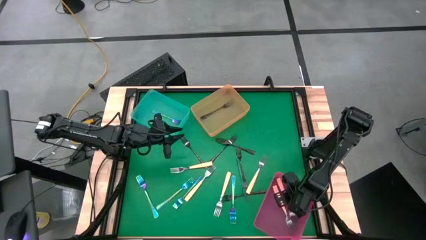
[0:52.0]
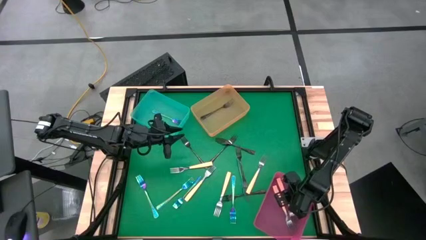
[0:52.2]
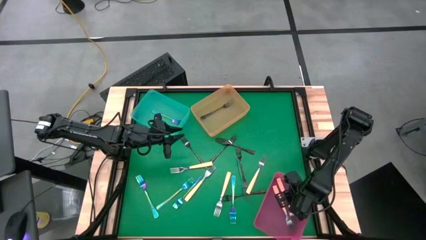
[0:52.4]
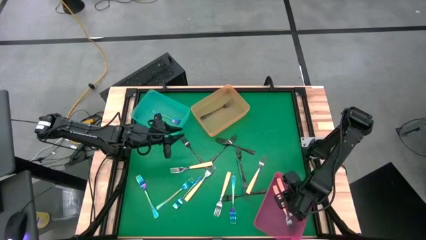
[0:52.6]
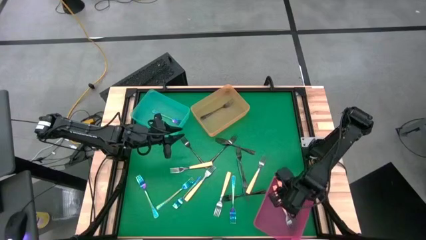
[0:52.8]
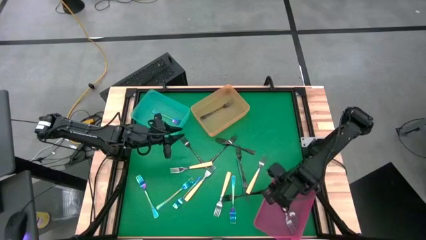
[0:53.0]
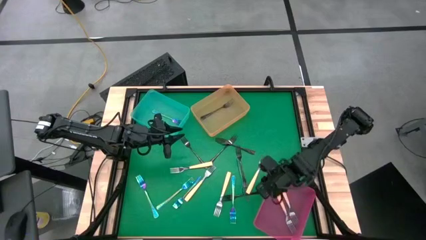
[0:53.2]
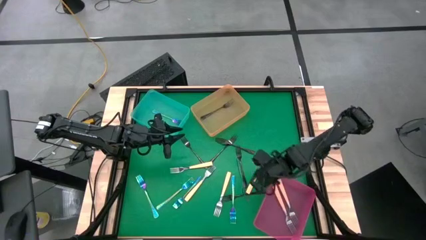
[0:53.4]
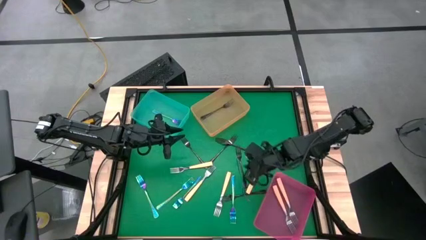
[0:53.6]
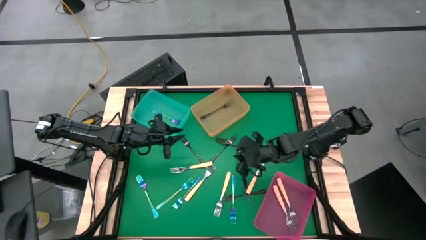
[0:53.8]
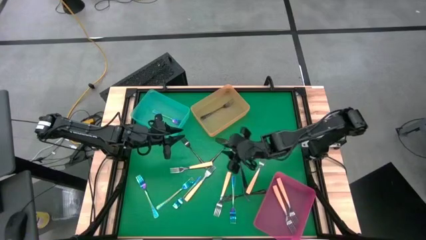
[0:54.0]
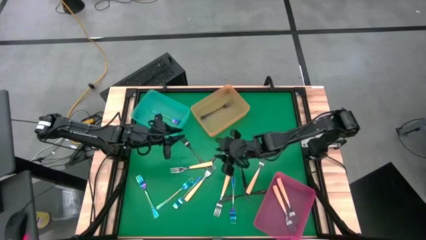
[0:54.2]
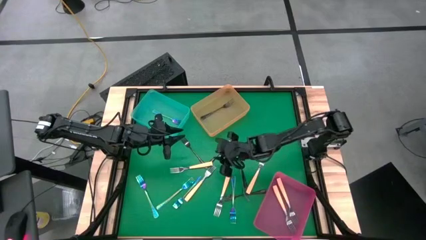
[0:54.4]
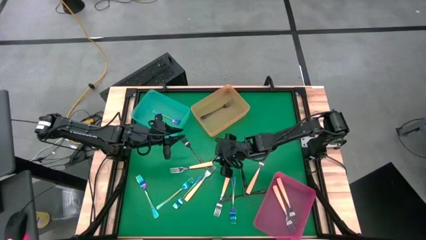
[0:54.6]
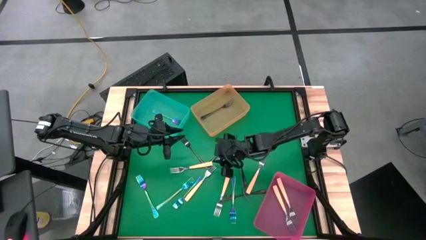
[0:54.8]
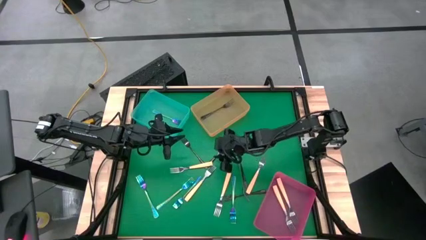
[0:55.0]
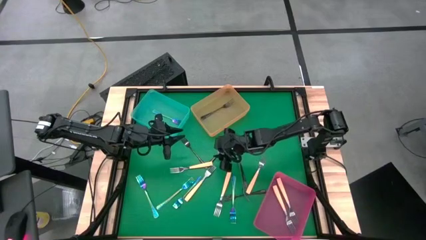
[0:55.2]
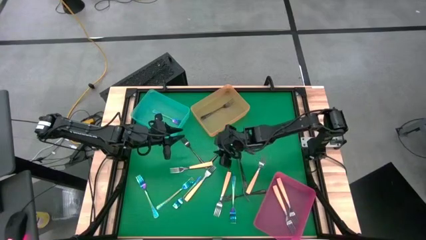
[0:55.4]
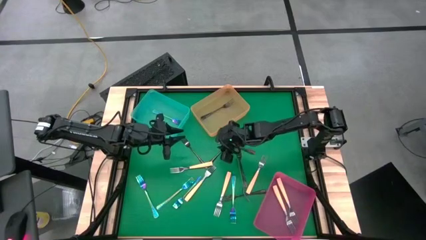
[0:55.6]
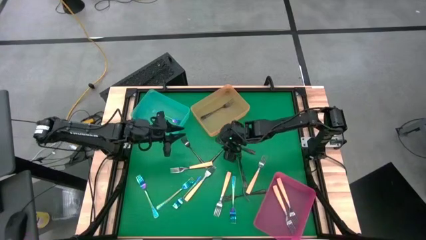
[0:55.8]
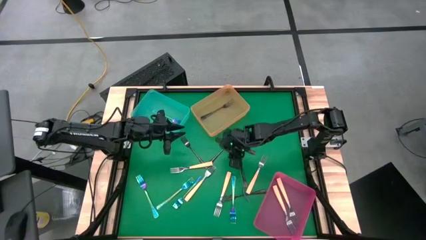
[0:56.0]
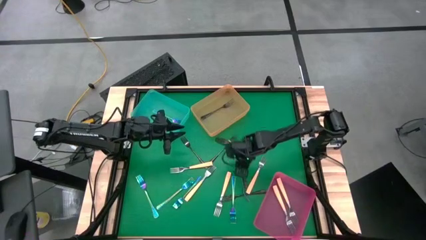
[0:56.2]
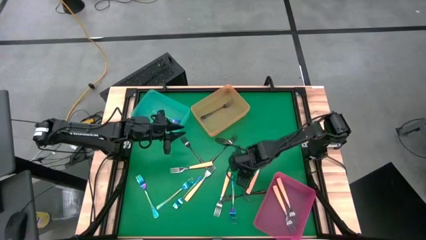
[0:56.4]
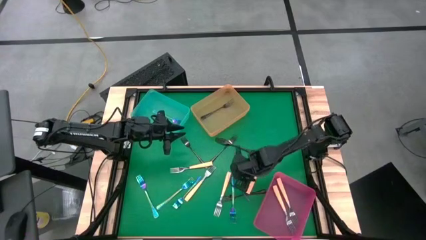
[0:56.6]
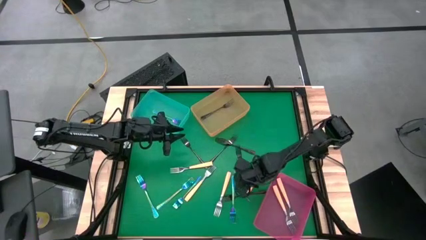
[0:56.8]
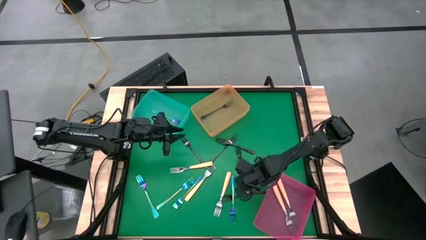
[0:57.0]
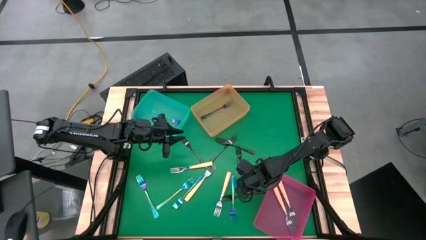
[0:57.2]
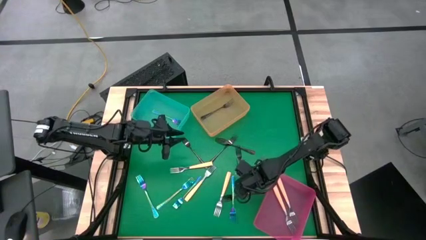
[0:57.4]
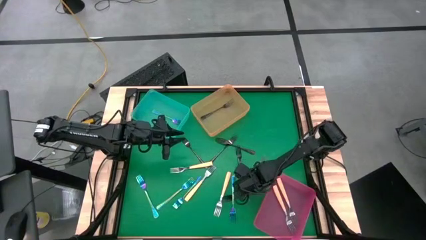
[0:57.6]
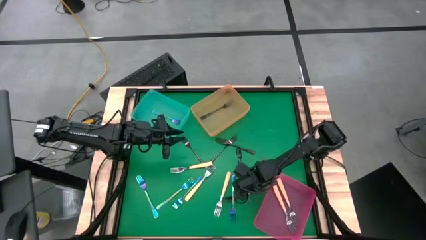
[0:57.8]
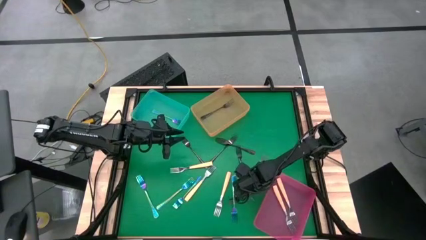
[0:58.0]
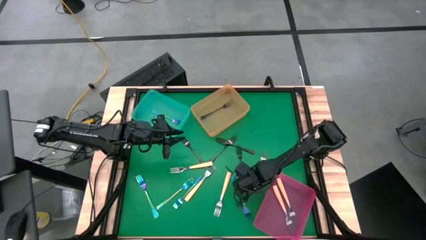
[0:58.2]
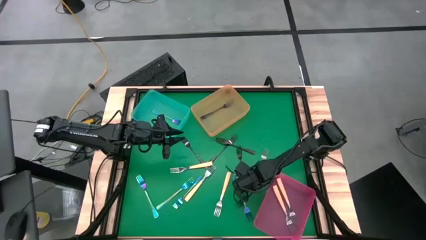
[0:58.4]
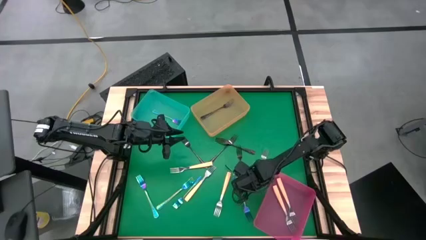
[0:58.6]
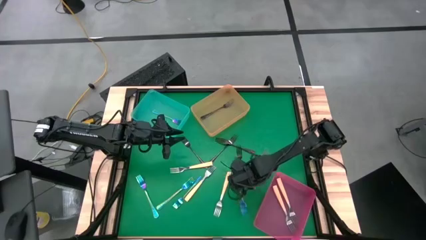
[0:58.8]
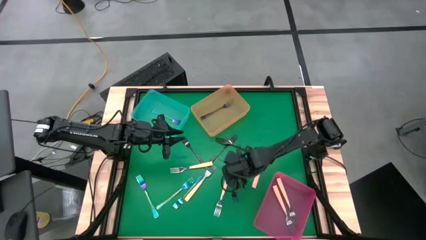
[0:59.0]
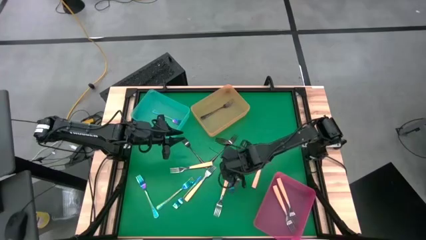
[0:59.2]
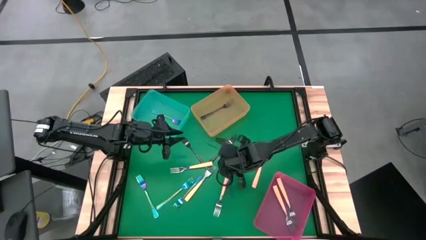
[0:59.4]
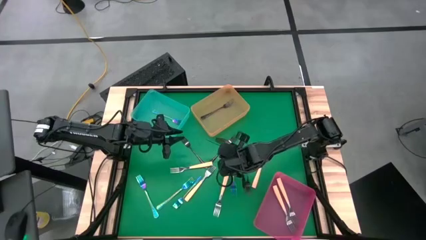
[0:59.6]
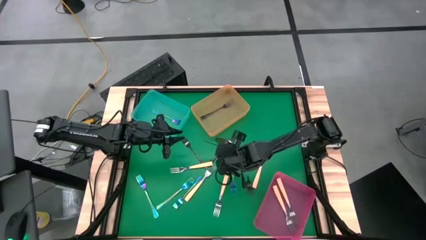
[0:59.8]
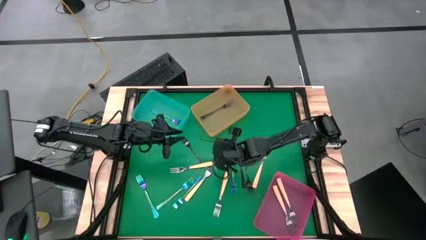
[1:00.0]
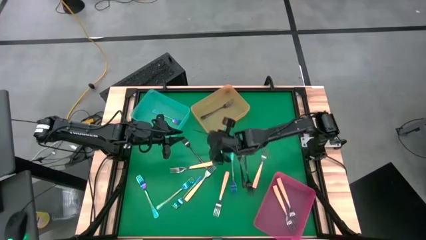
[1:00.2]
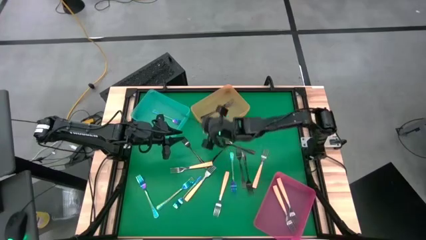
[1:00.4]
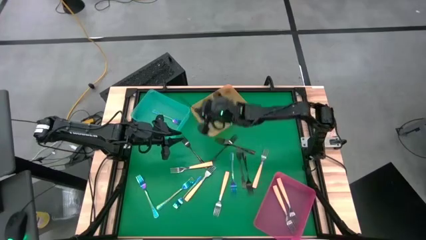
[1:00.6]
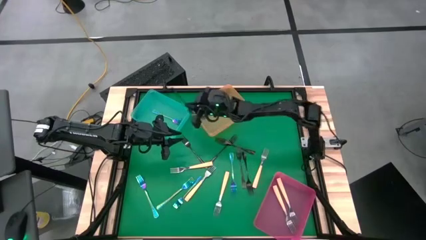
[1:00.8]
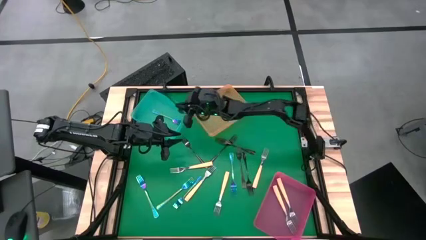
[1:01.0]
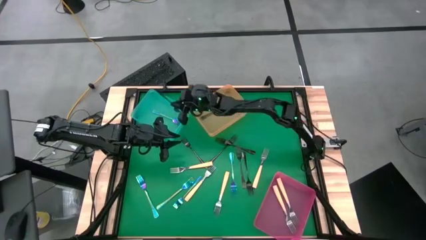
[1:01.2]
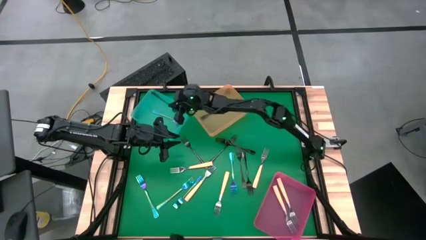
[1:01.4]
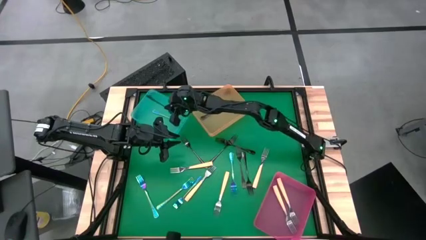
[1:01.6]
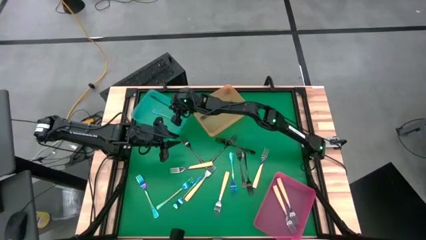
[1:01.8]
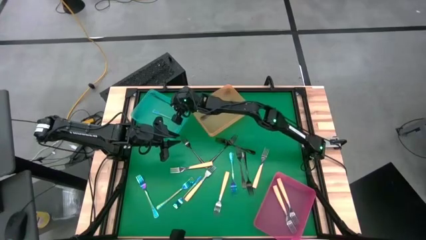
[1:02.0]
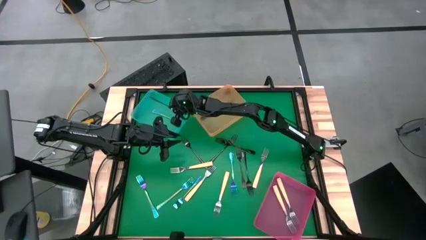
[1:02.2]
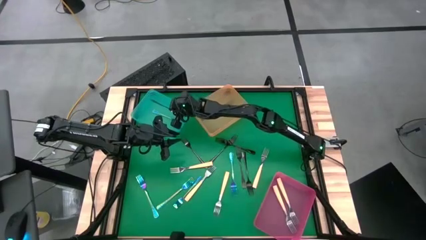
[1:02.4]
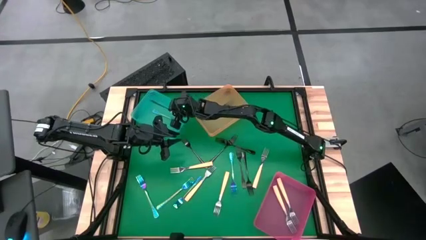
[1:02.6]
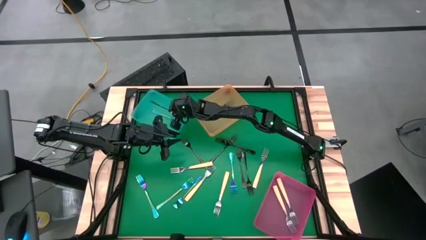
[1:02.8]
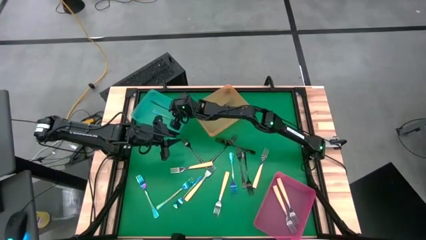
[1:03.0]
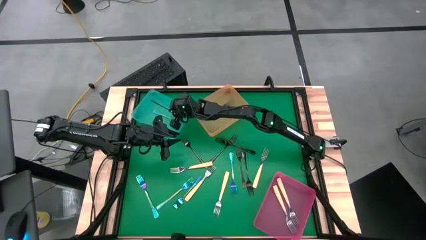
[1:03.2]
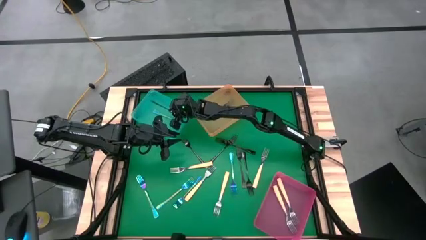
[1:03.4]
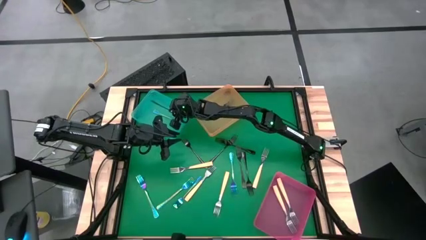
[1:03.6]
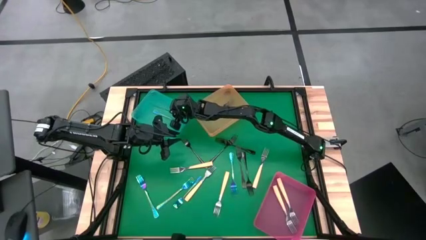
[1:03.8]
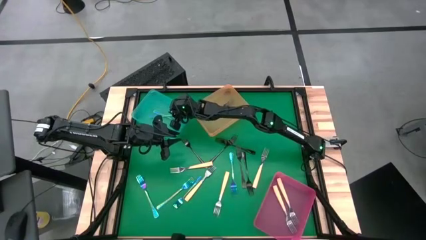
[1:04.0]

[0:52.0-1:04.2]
Task: Sort silverware by color (type)
Put the blue fork into the blue bin

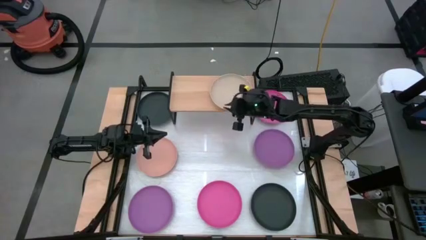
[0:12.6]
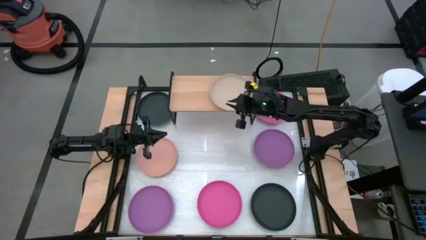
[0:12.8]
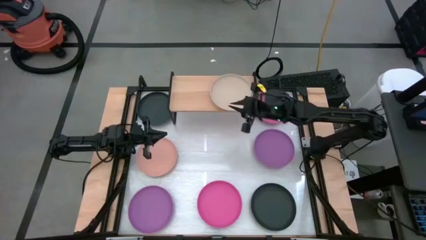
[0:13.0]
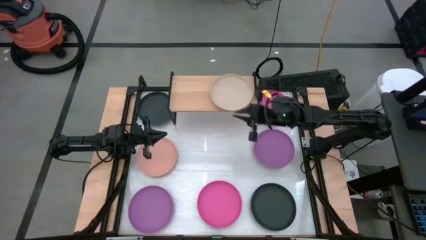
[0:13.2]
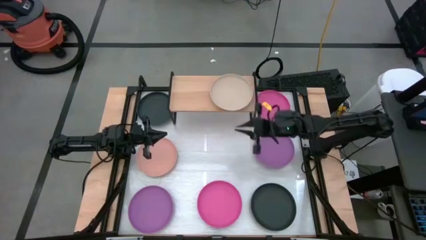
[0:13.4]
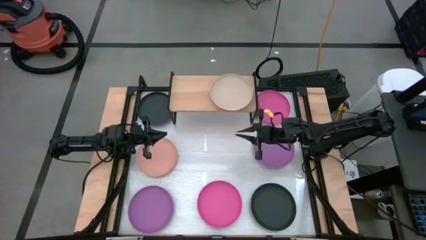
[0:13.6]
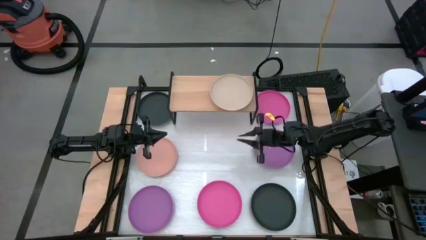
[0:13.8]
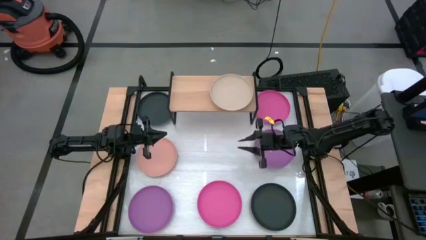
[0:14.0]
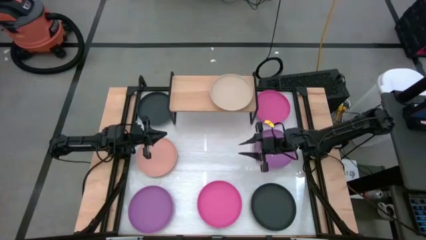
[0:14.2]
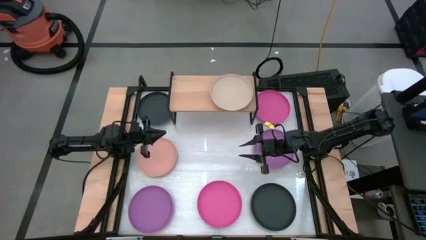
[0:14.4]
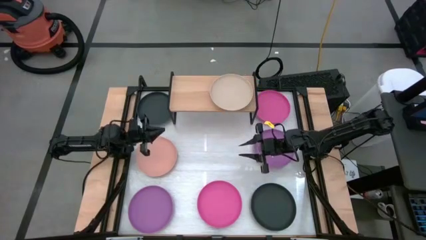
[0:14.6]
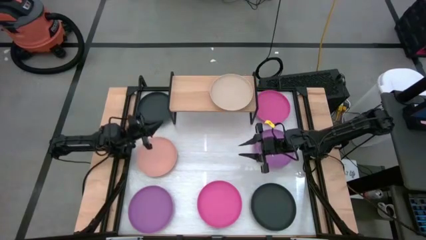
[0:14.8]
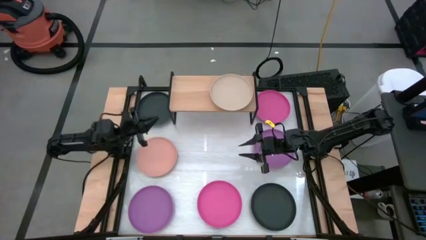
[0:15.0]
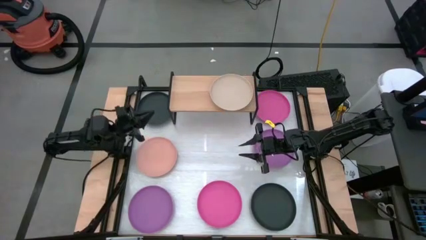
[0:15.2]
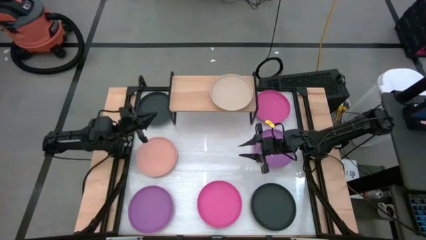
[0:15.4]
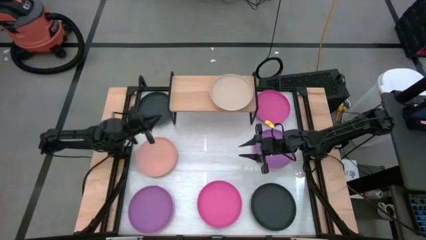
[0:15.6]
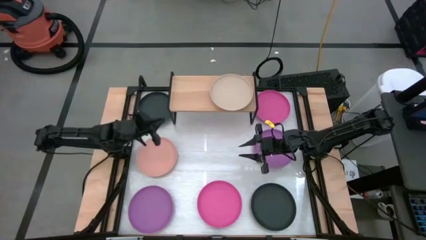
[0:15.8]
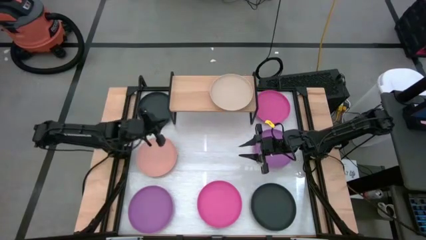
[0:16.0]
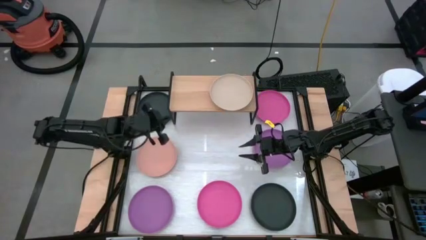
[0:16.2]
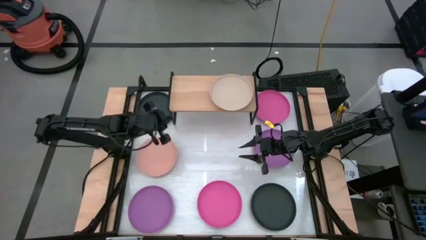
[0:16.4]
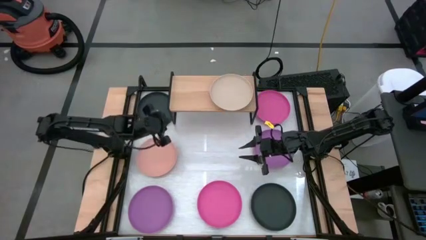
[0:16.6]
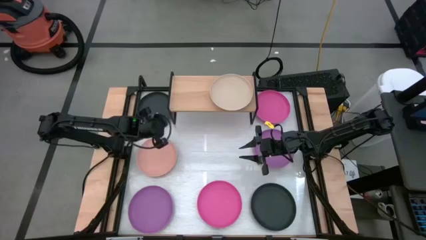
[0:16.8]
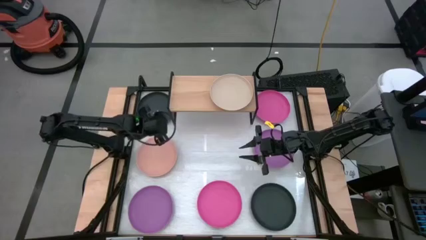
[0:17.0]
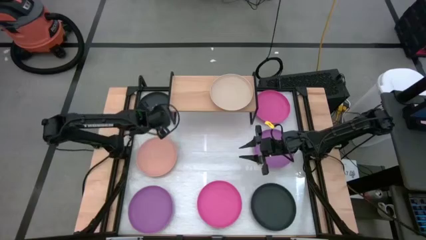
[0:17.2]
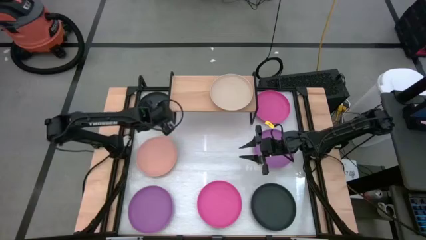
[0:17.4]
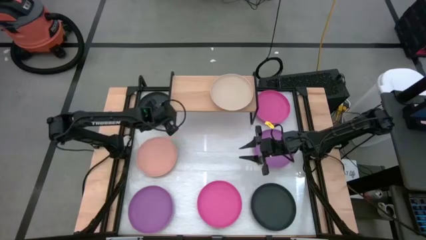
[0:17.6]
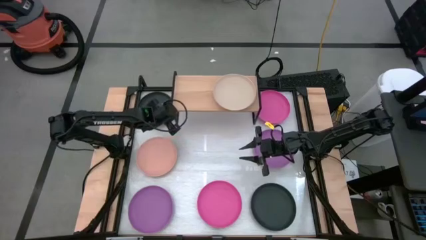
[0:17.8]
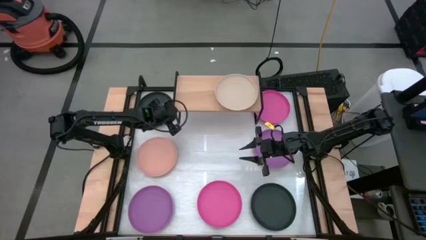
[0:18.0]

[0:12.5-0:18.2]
Task: Place and stack plates onto a shelf
Adjust the shelf
